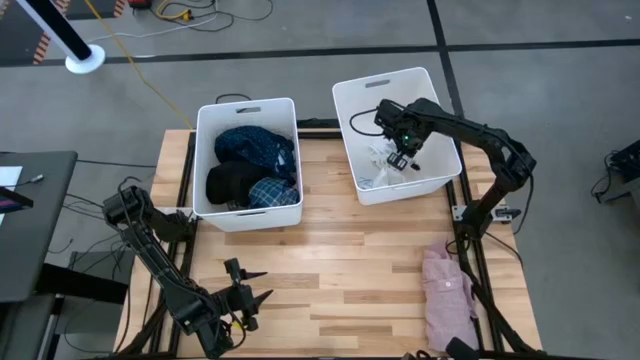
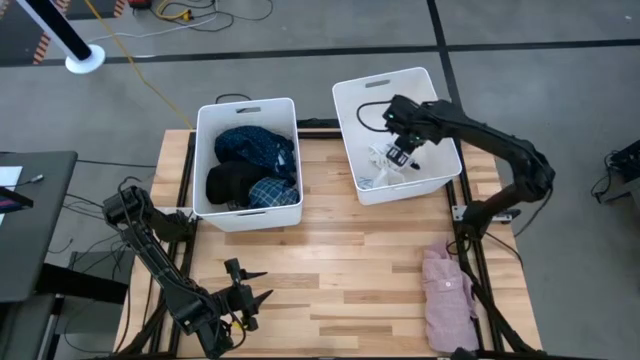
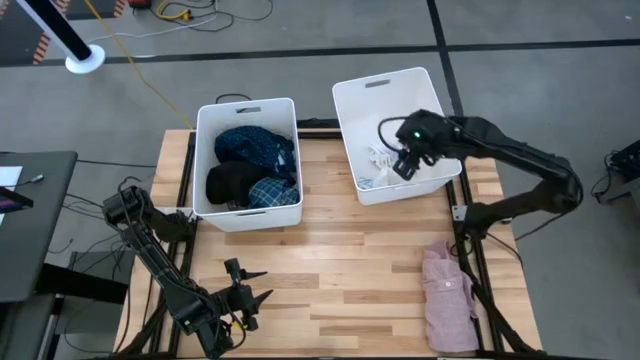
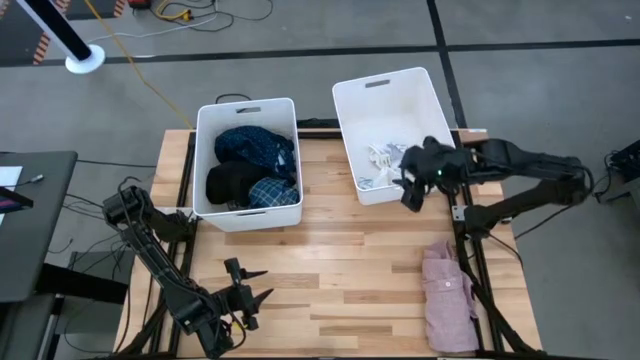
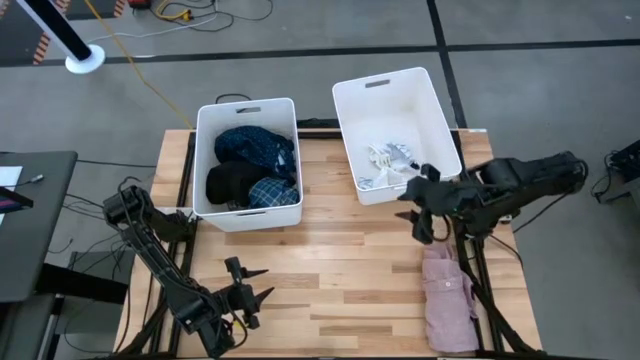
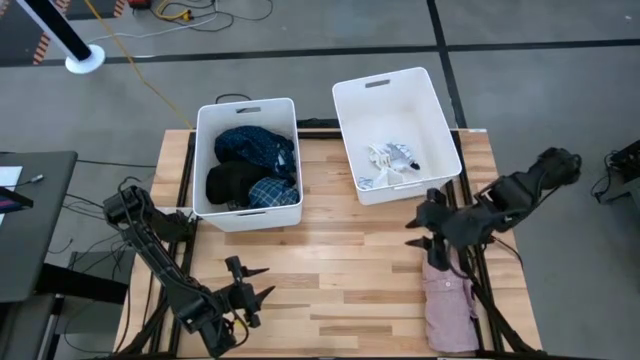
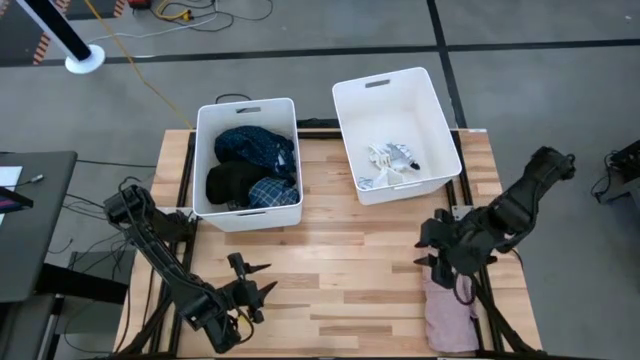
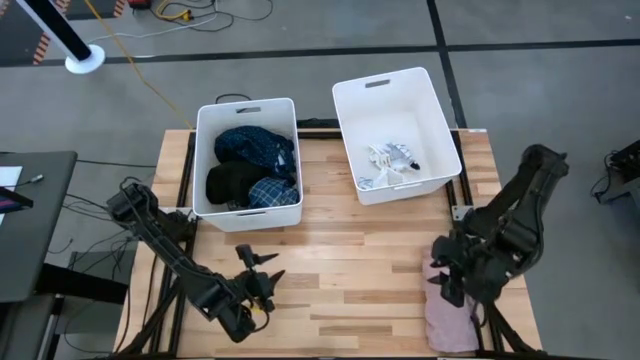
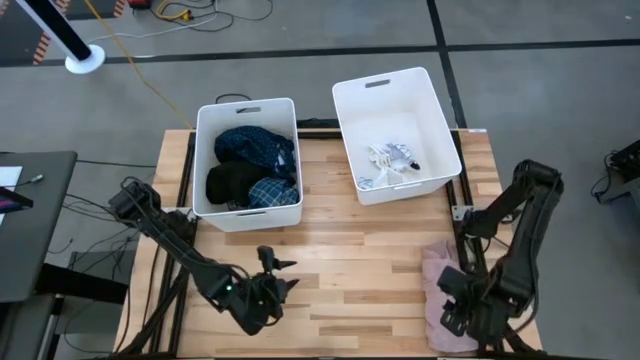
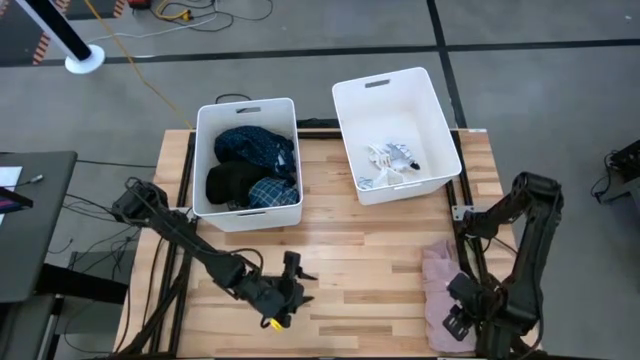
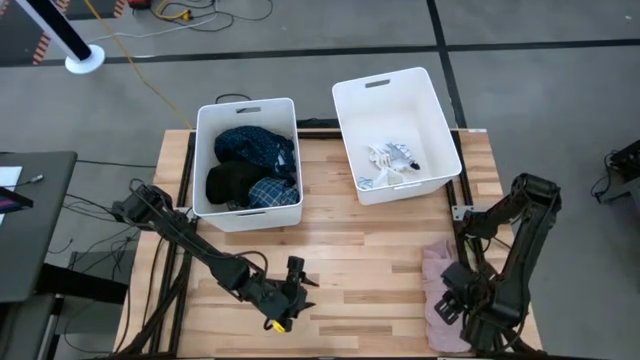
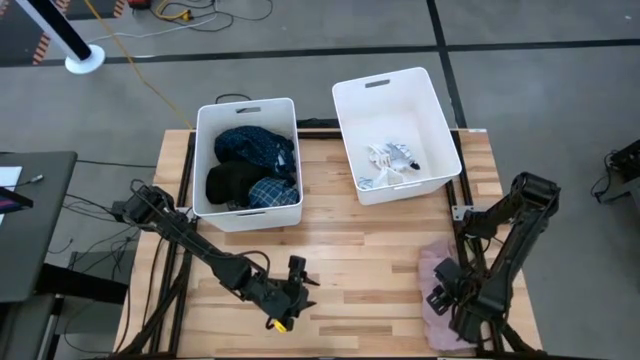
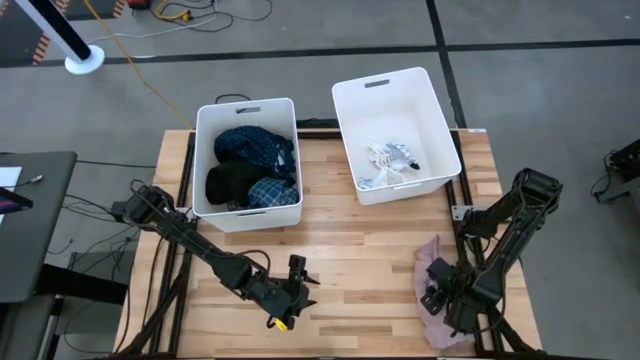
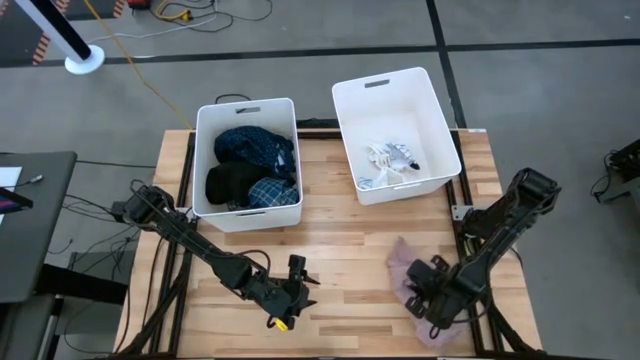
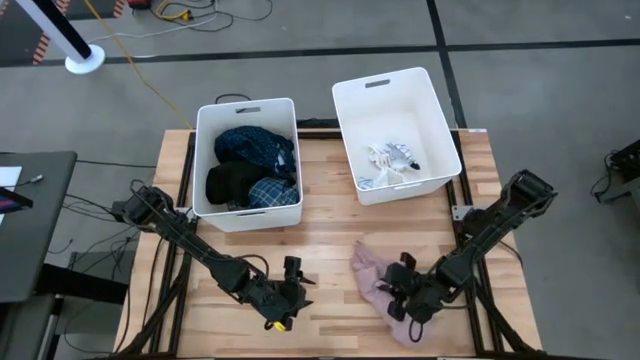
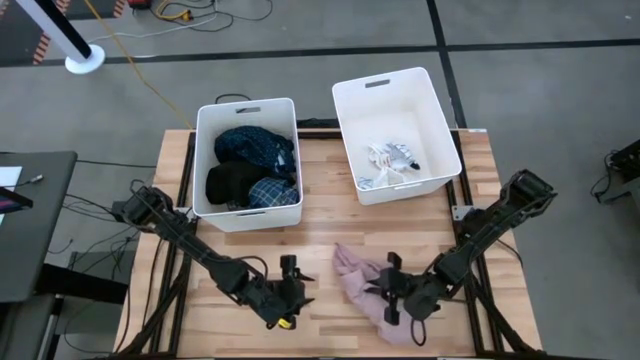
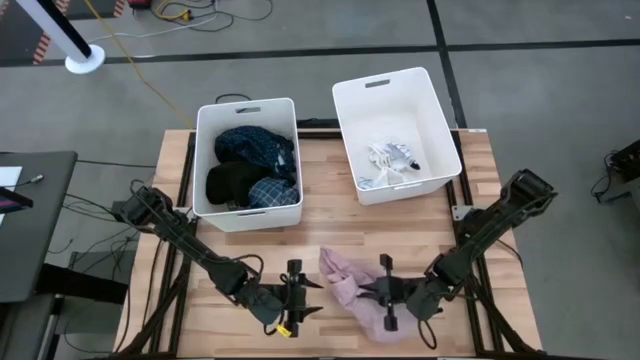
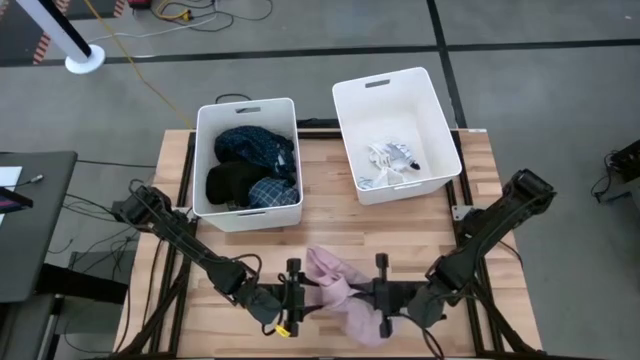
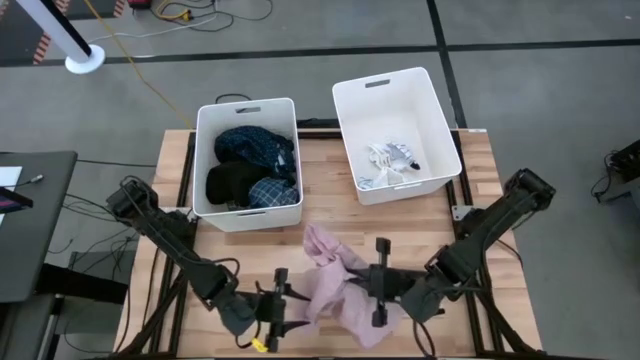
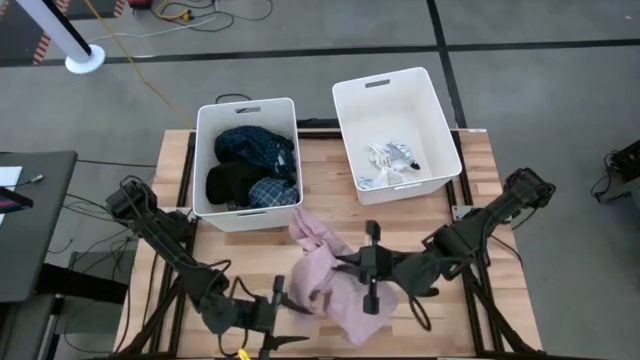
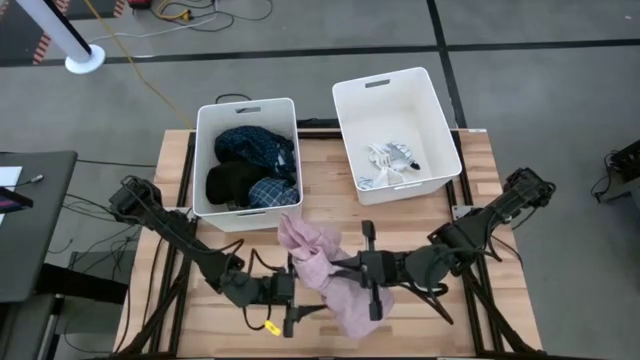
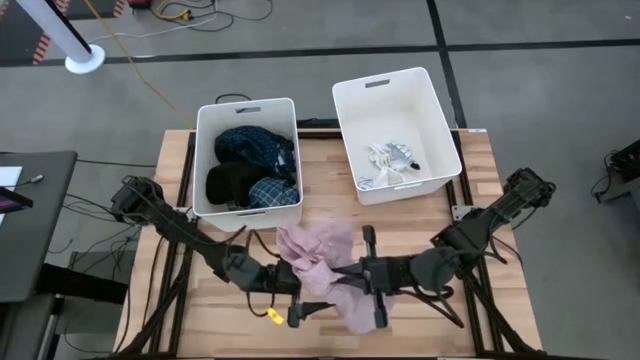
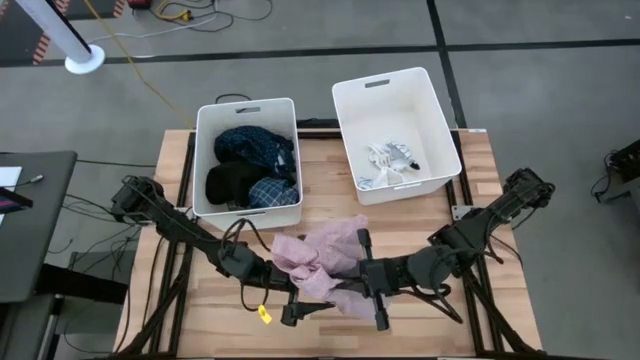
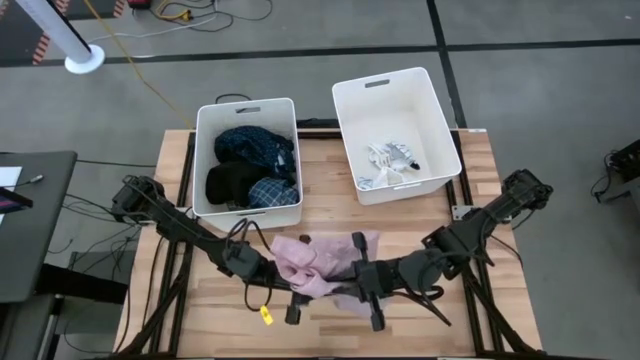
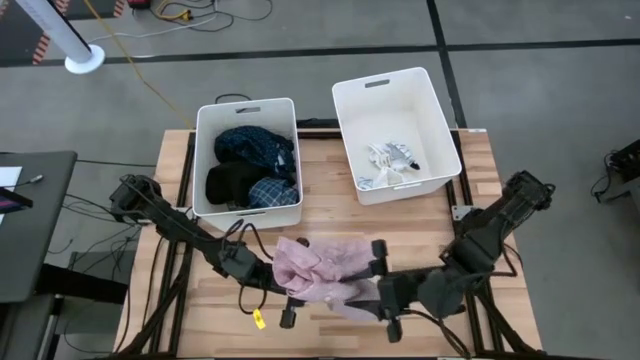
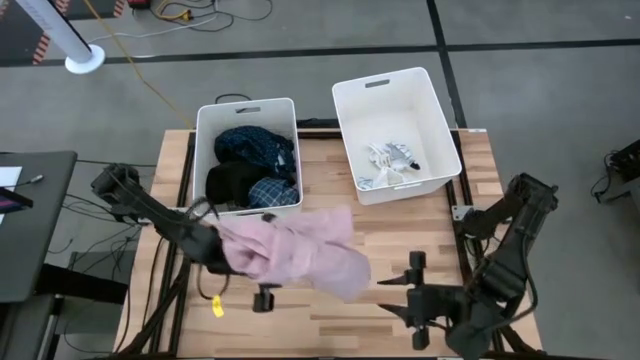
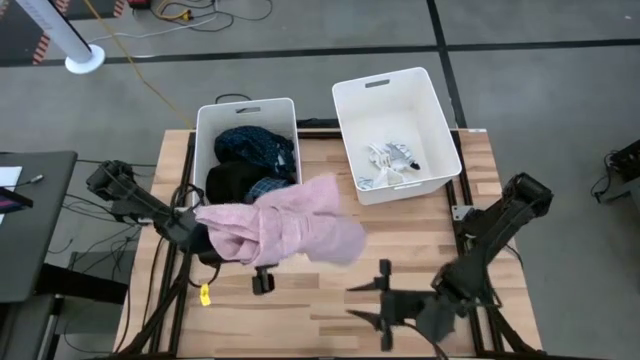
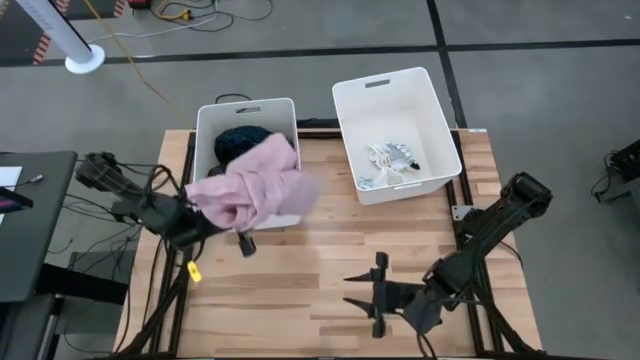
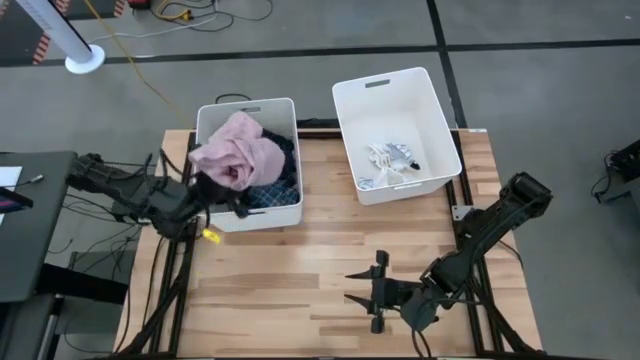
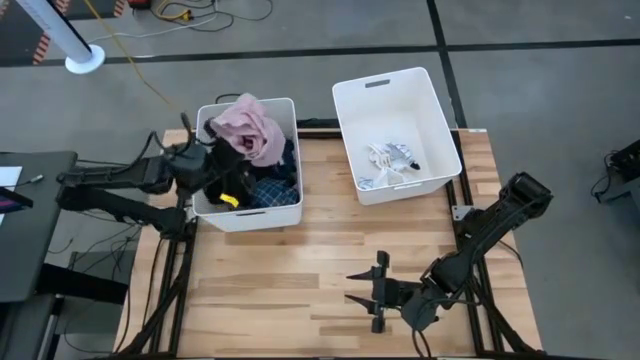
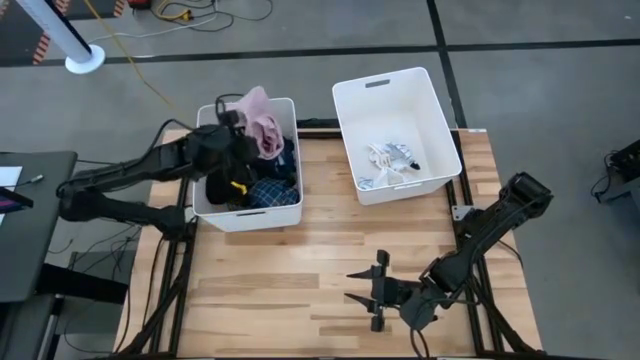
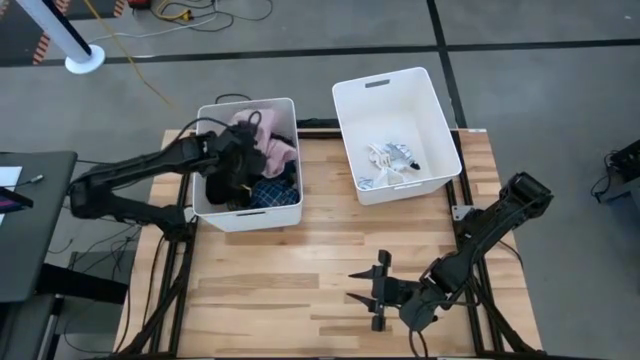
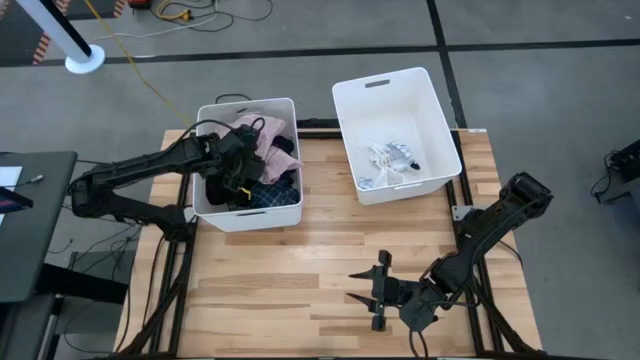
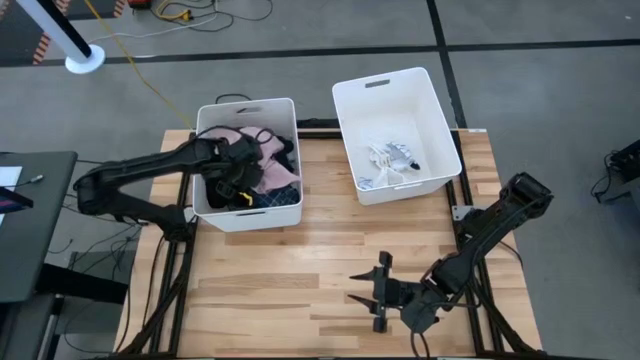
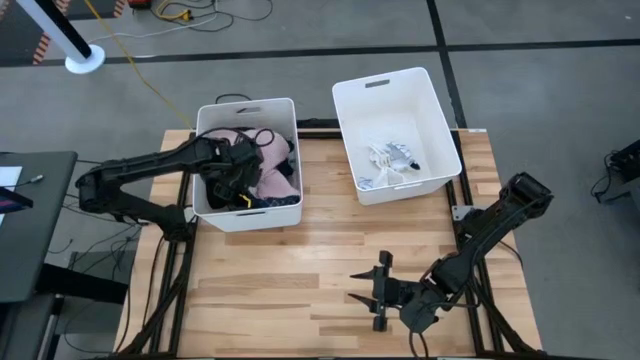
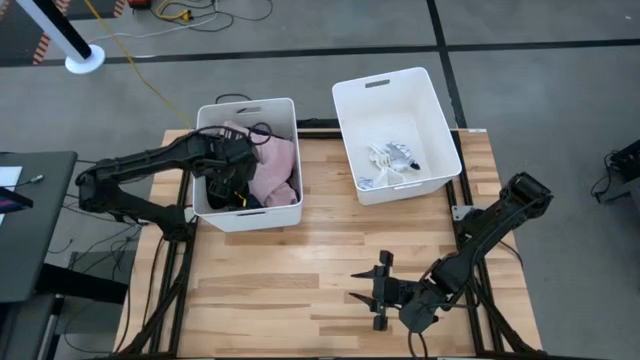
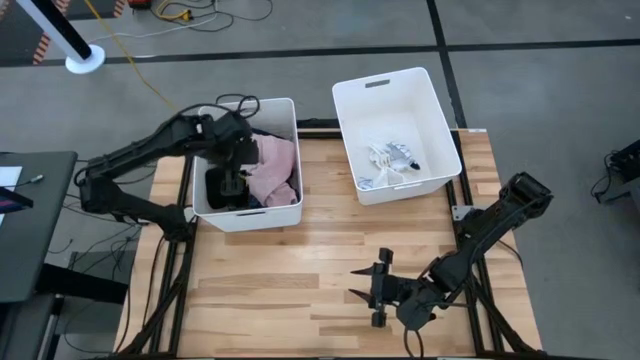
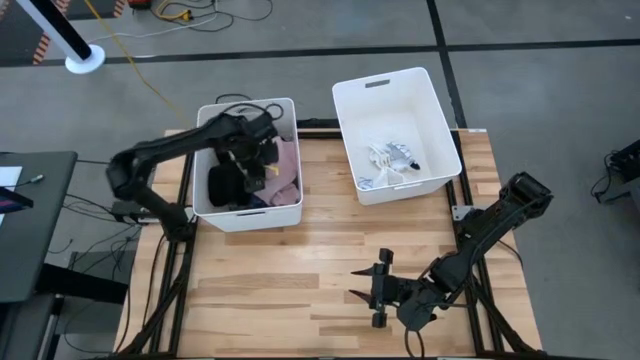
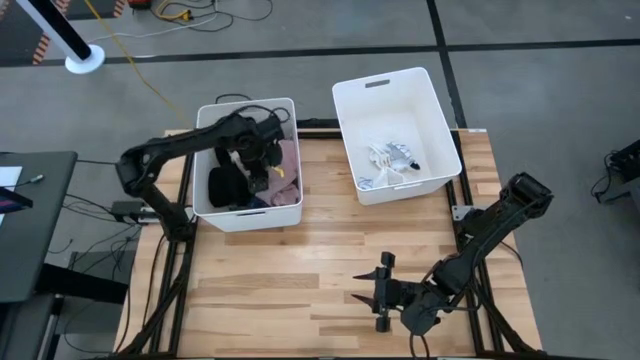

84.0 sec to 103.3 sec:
Task: Sort clothes
Put the pink polo shirt into the left bin

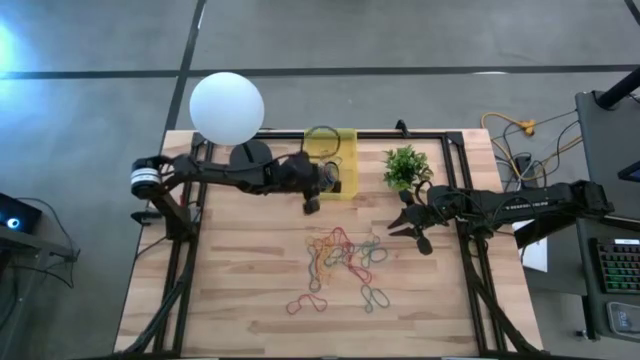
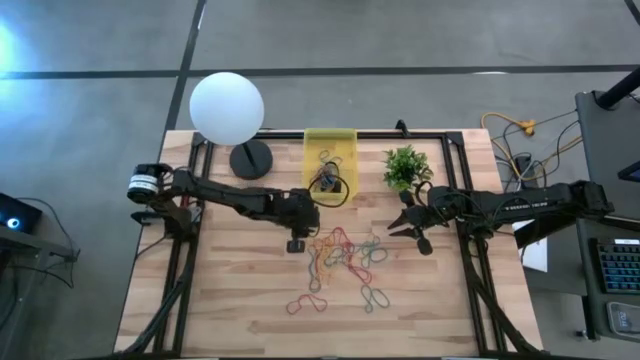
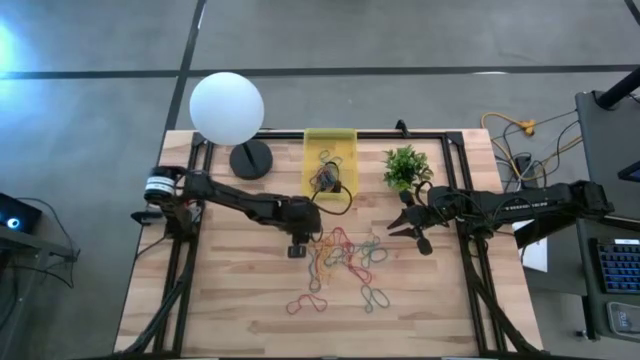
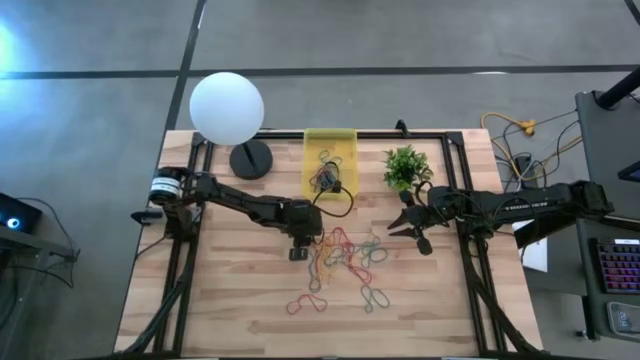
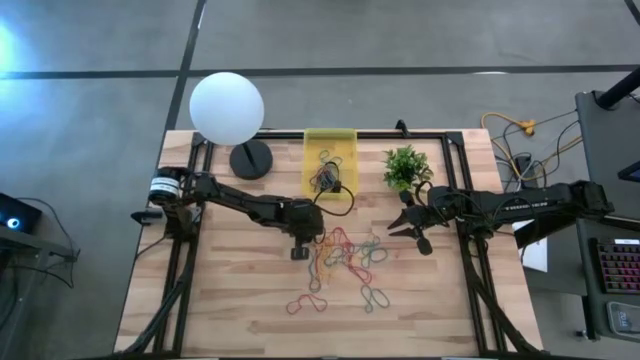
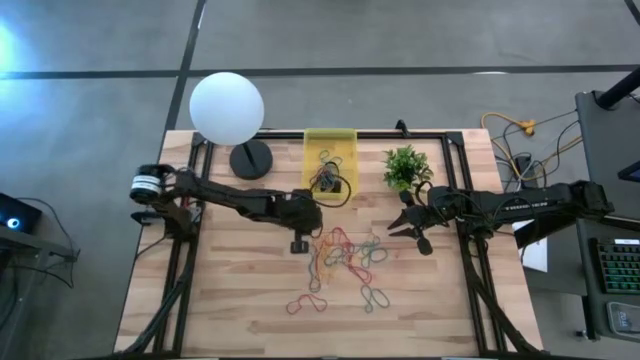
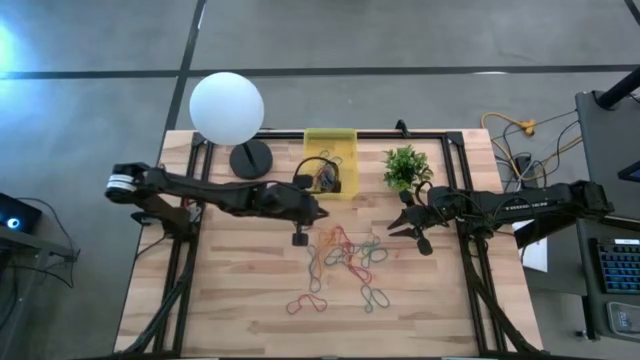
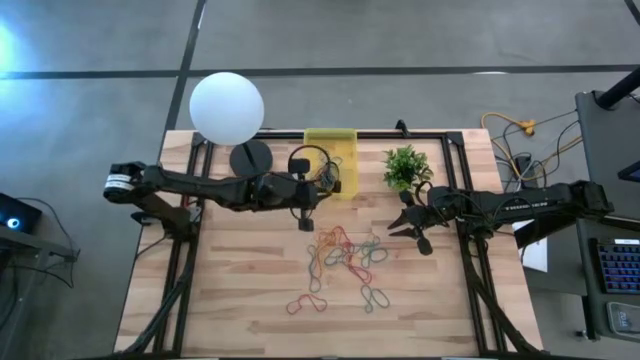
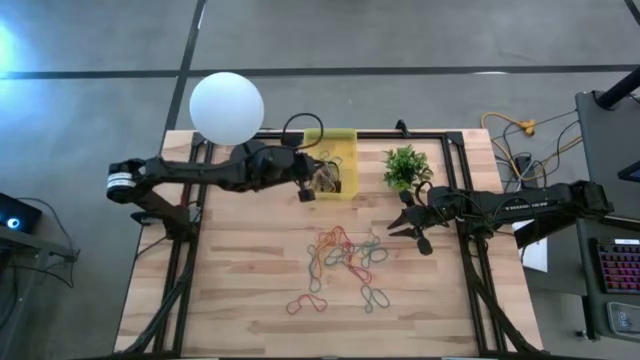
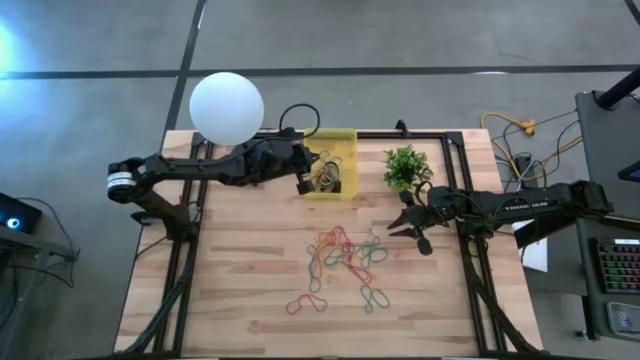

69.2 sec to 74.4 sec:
Task: Pick and place rubber bands into bin
Put the yellow rubber band into the yellow bin
